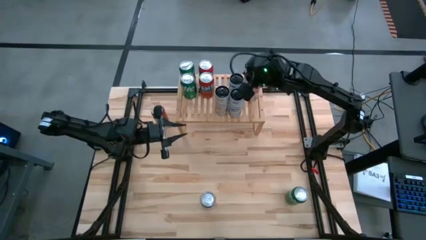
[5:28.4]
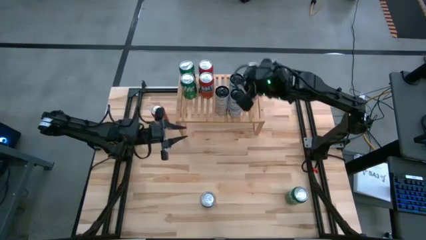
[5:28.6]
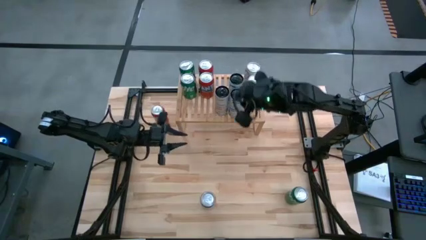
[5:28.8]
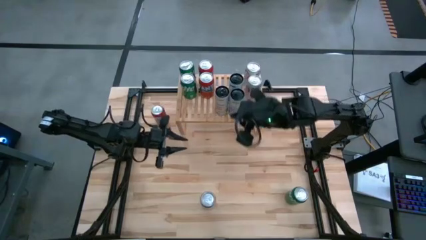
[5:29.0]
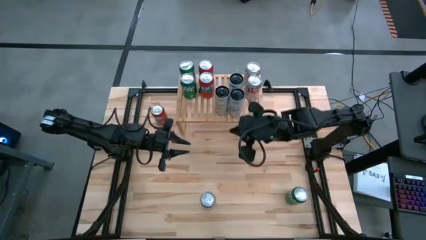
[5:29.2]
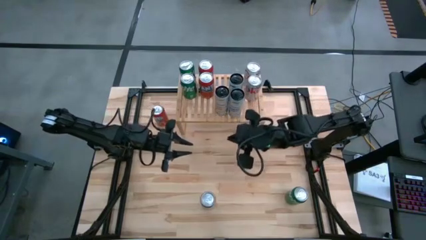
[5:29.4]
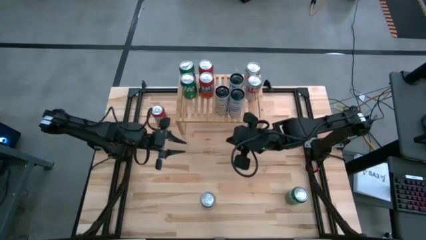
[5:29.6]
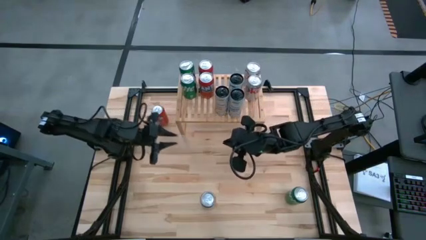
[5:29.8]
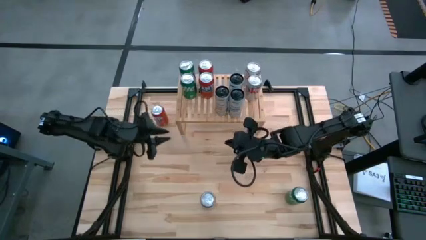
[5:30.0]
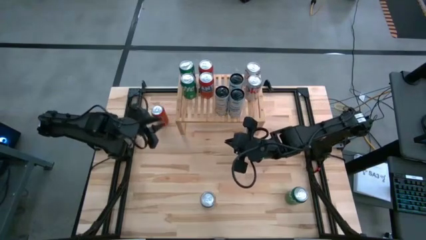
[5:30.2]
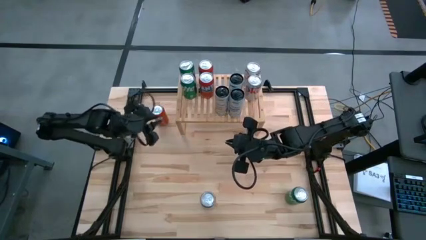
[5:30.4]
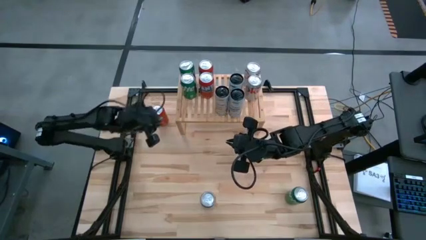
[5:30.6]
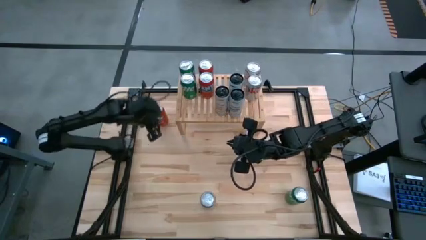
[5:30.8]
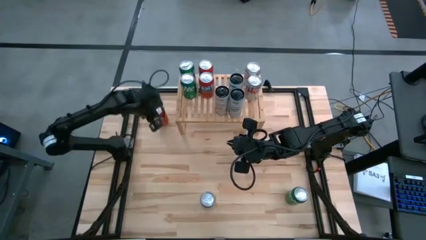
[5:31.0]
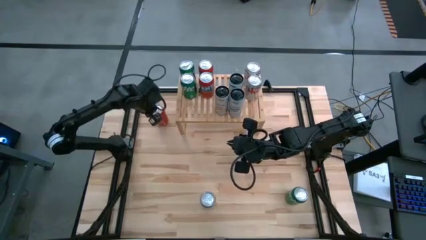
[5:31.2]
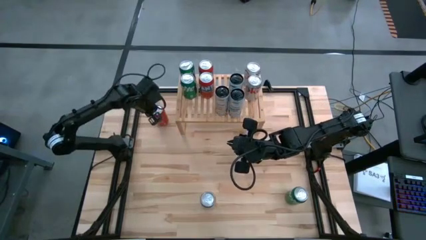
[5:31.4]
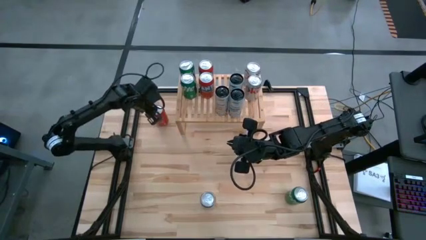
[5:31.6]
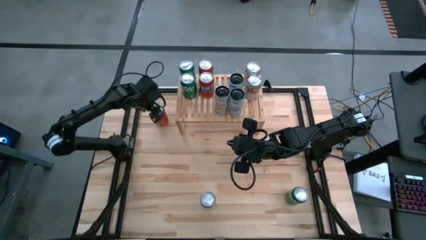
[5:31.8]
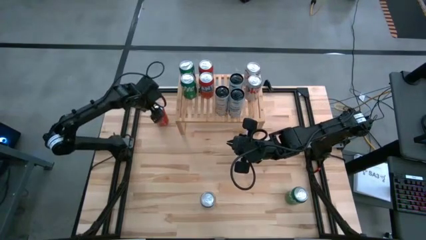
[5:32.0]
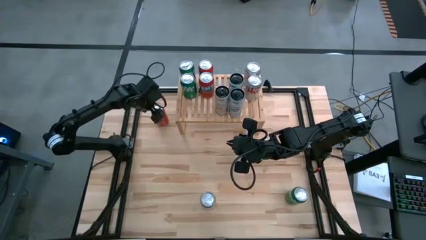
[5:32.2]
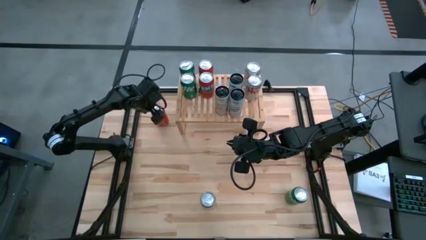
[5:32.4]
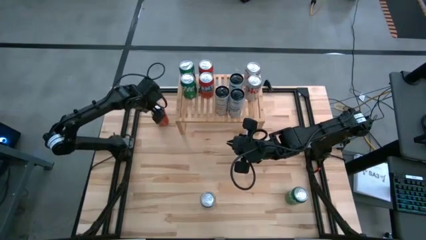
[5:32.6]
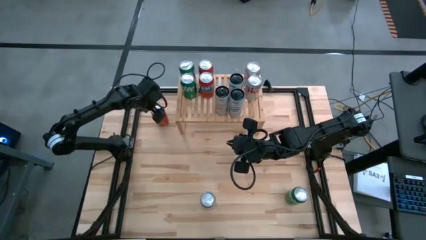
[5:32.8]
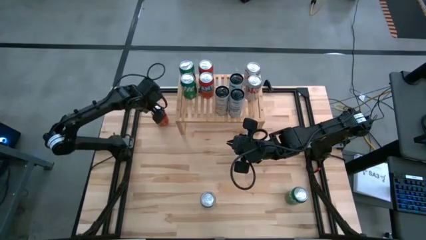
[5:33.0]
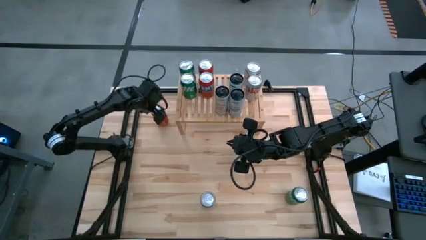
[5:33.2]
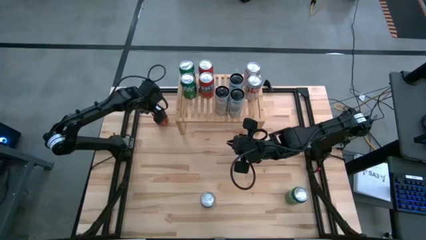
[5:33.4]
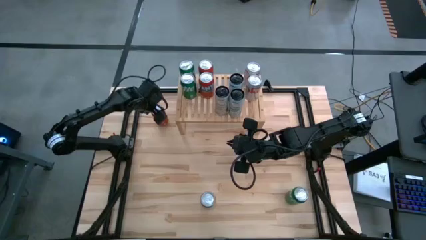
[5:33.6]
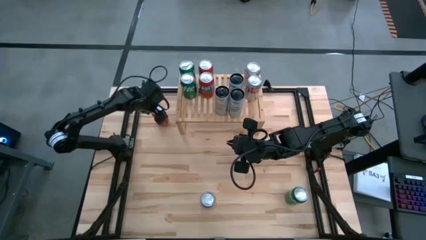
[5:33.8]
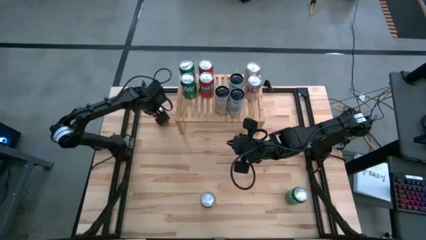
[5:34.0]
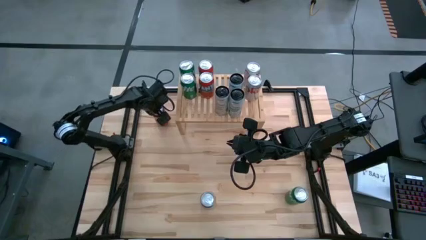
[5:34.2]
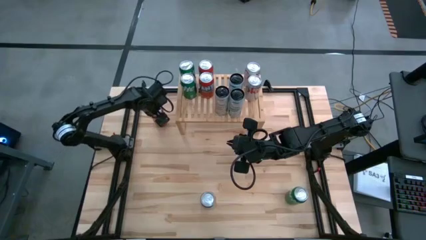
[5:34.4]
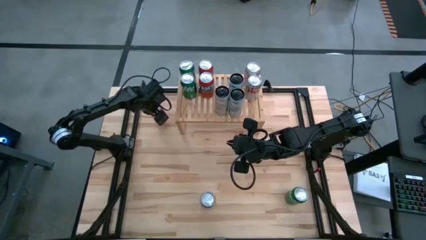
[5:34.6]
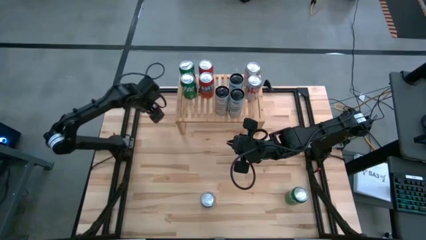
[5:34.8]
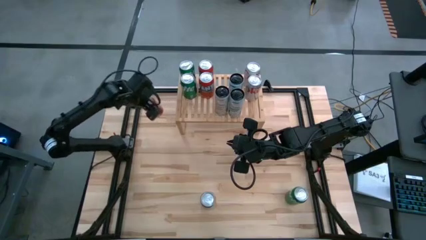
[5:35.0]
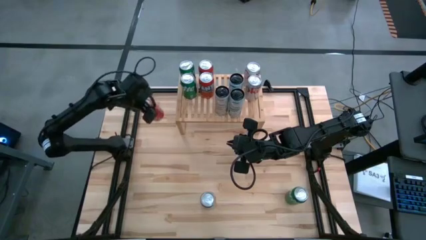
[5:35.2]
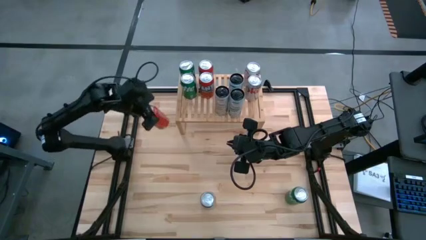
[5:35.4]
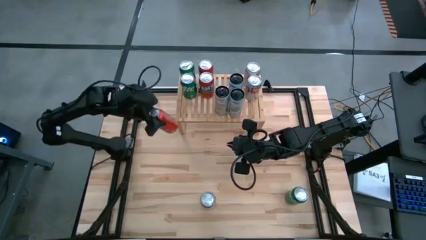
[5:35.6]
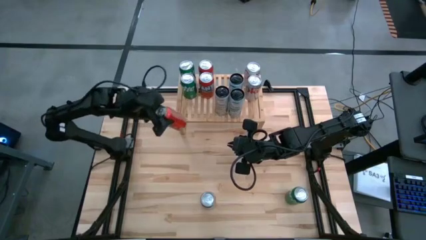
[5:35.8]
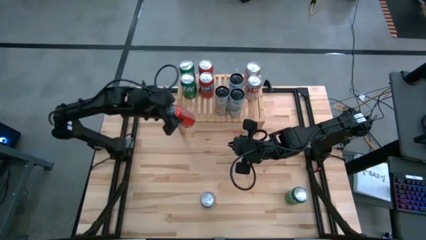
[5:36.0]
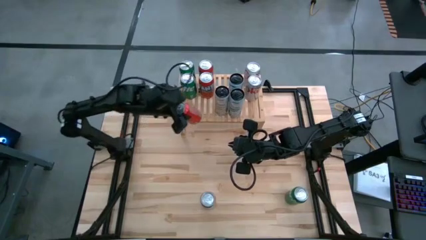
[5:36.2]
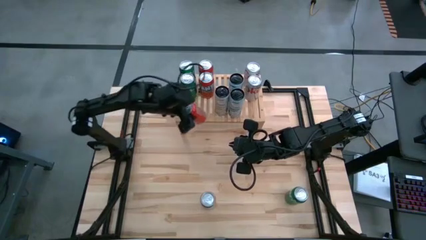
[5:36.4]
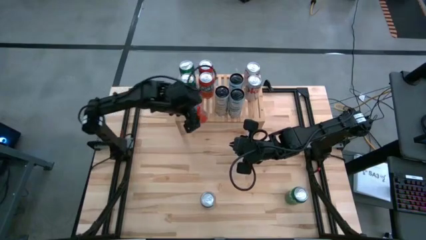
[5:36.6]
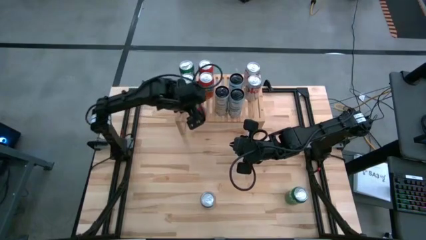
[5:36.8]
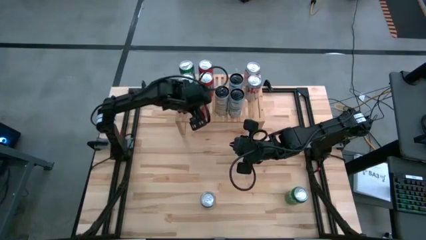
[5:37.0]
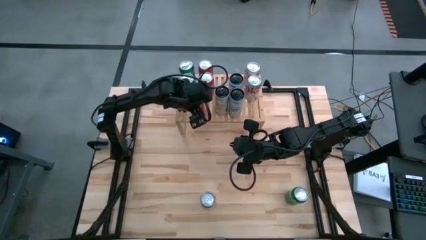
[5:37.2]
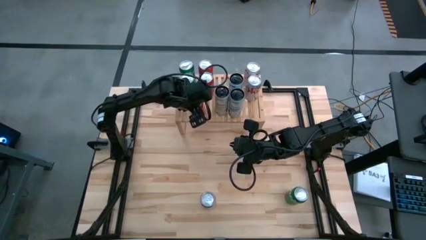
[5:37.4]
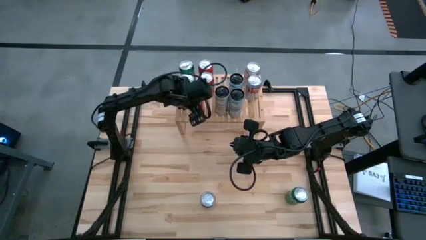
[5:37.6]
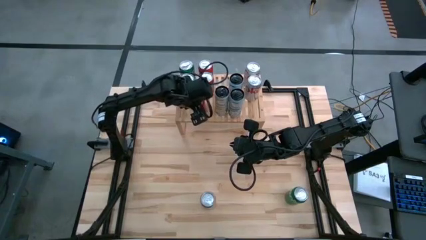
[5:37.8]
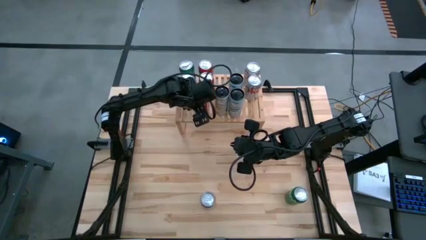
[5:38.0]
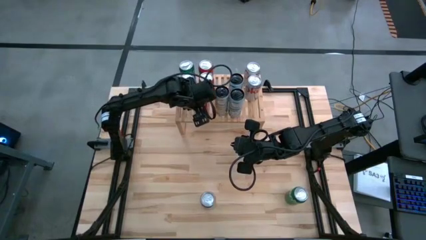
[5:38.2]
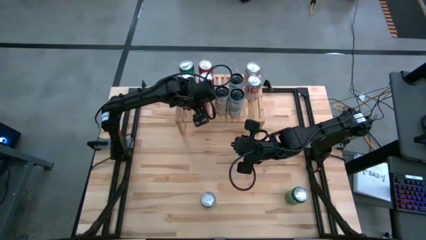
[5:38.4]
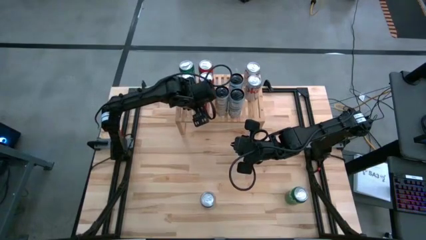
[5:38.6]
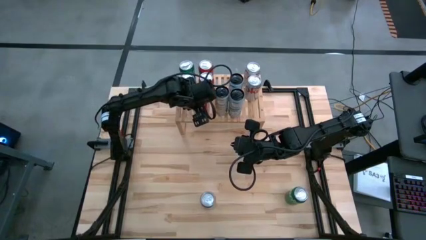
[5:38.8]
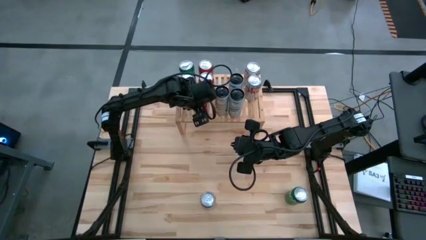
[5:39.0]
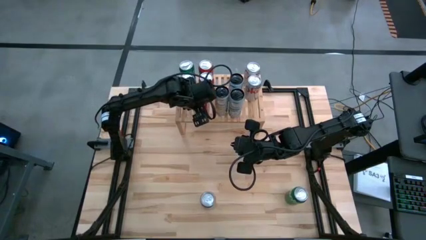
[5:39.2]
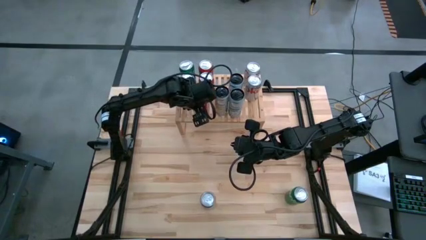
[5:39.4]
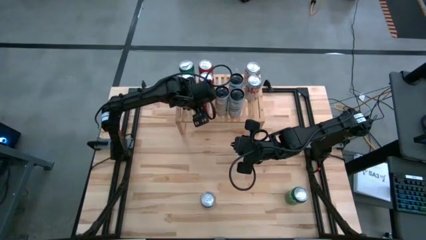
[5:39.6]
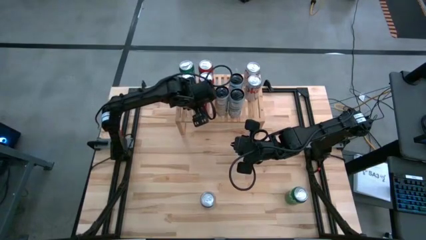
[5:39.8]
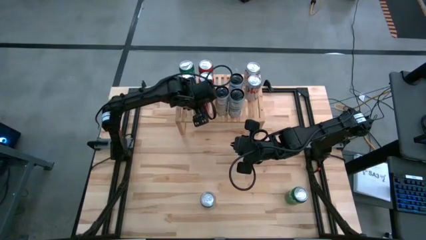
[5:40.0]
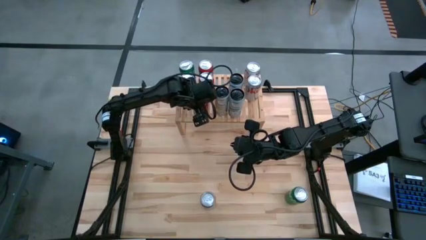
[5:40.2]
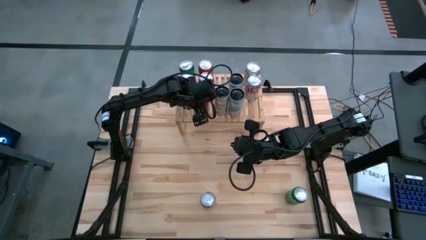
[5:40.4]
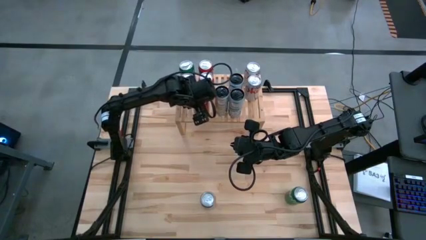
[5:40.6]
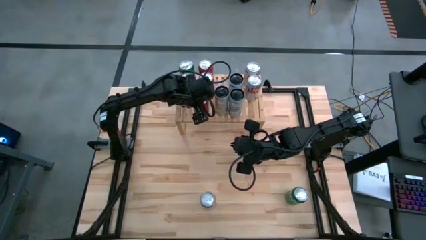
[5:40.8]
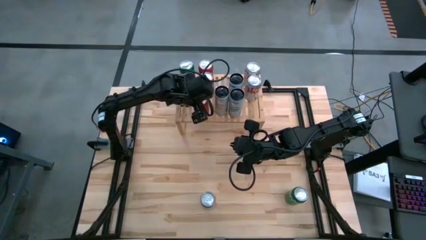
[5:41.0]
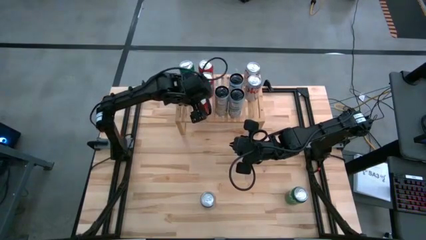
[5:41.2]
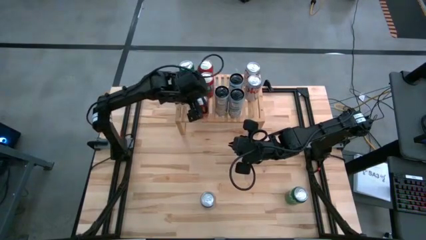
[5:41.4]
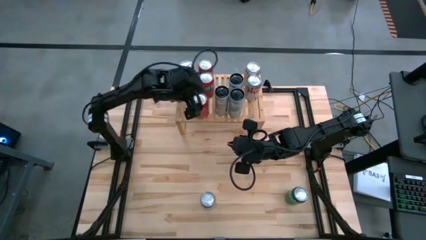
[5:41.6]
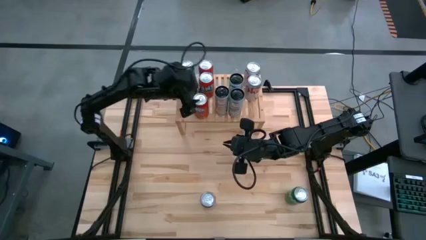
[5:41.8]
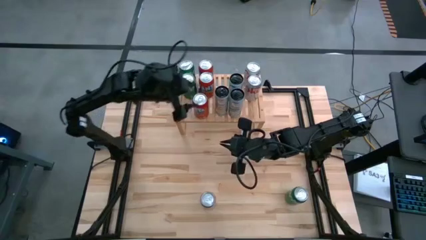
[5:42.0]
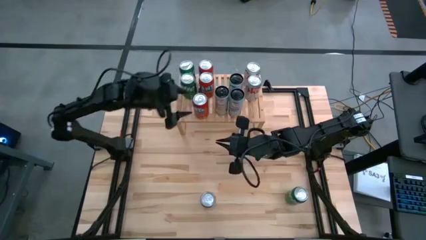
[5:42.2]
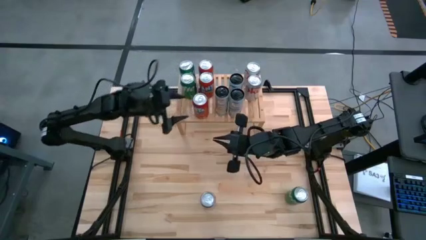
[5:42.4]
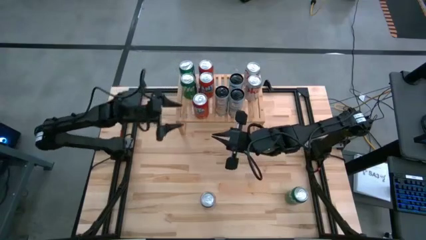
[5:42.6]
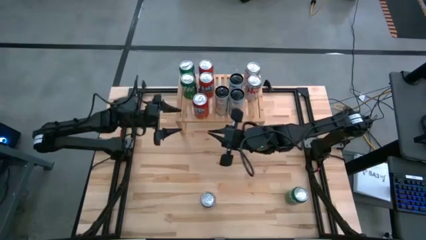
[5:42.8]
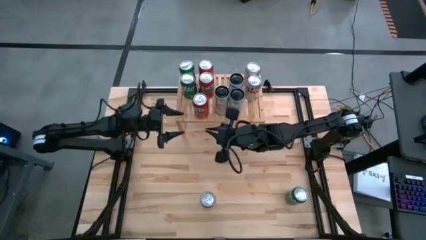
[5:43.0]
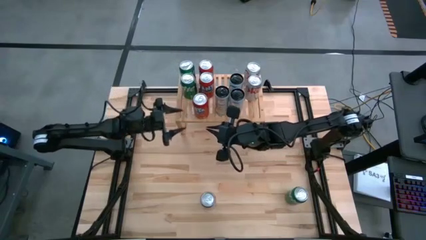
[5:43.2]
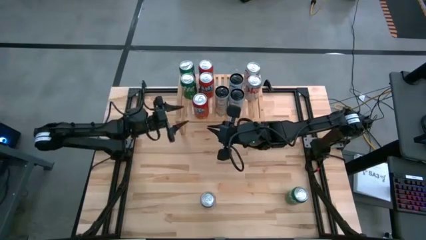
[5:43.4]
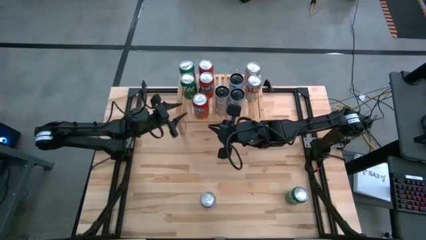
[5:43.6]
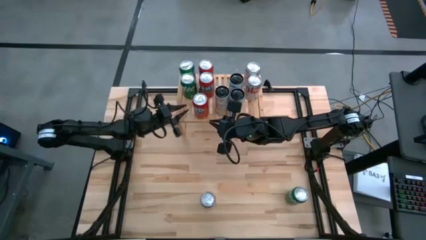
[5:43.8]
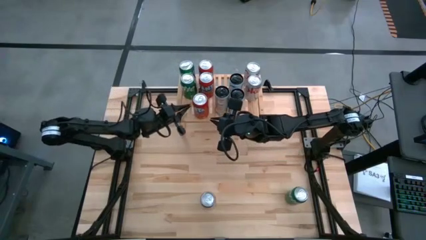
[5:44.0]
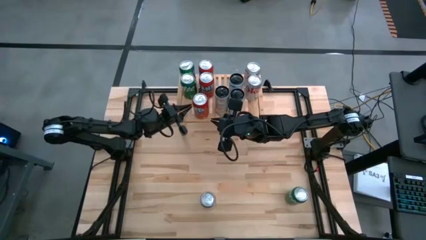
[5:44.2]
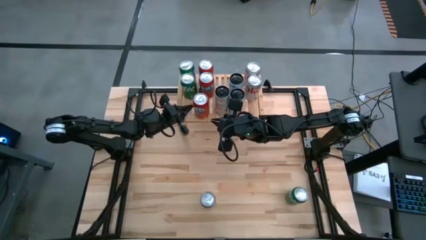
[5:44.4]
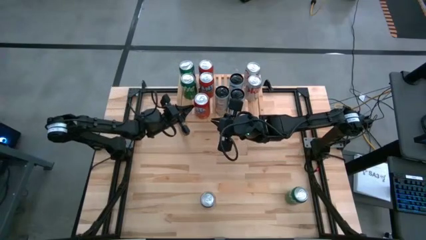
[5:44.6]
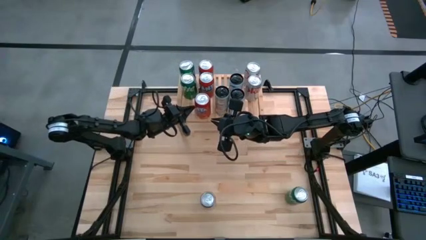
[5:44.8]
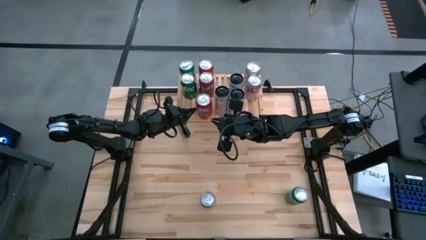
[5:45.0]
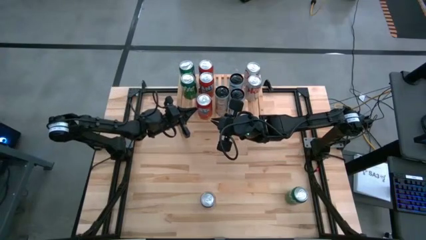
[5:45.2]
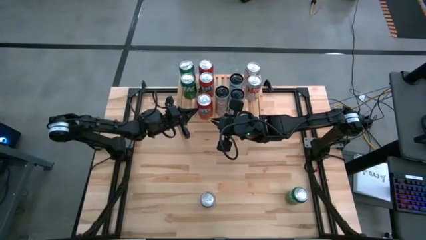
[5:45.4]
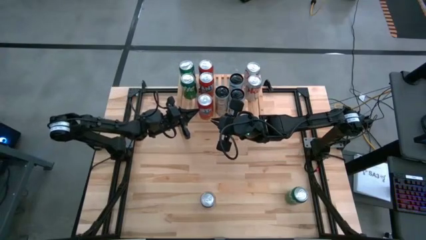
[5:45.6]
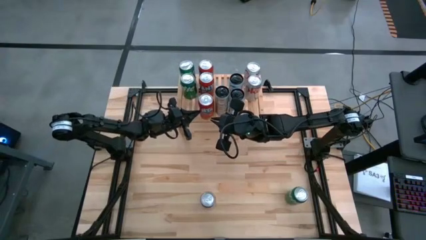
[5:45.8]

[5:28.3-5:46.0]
Task: Place canned beverage on shelf
Put the red soda can aligned with other red soda can on the shelf
